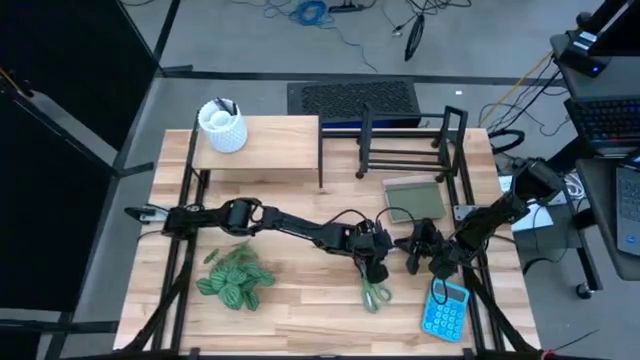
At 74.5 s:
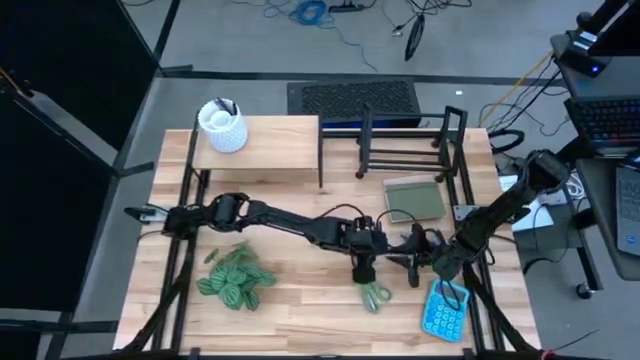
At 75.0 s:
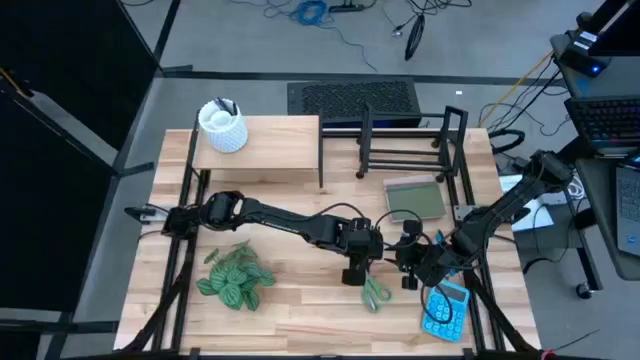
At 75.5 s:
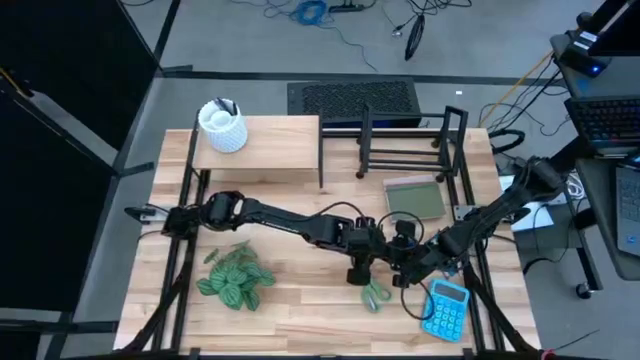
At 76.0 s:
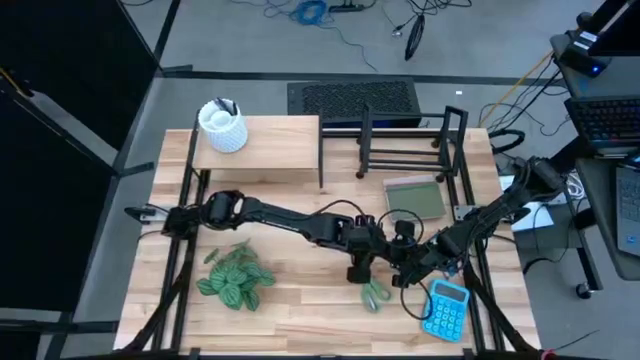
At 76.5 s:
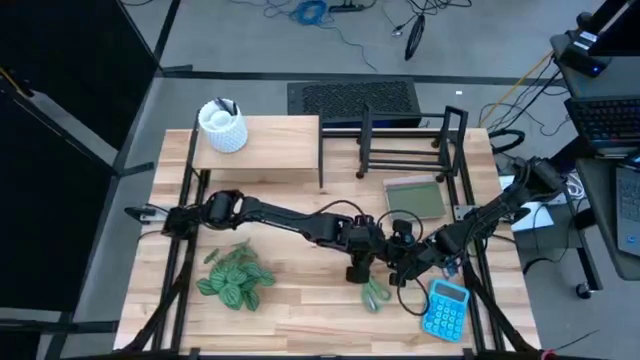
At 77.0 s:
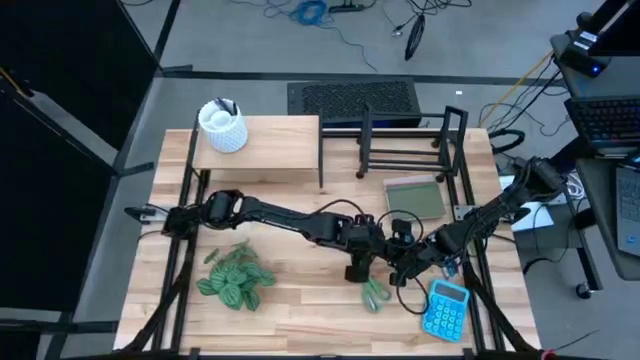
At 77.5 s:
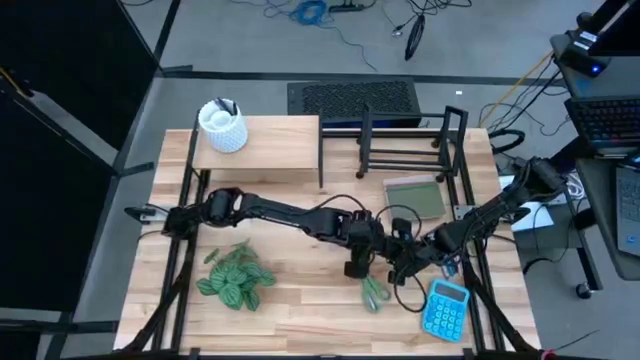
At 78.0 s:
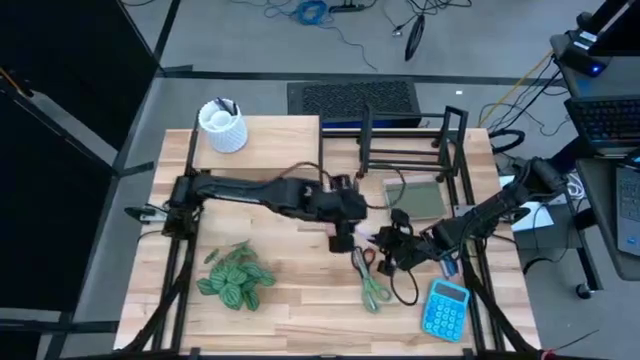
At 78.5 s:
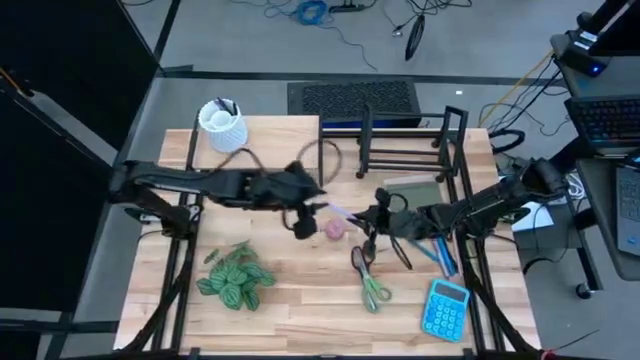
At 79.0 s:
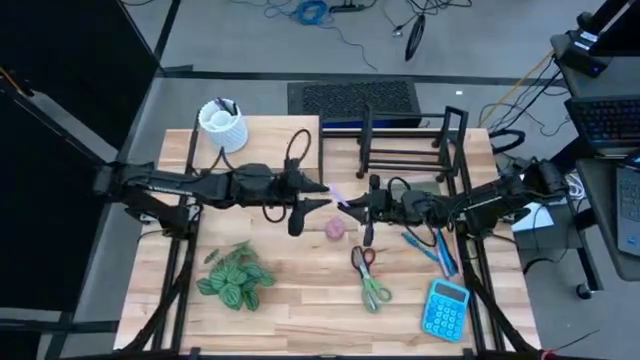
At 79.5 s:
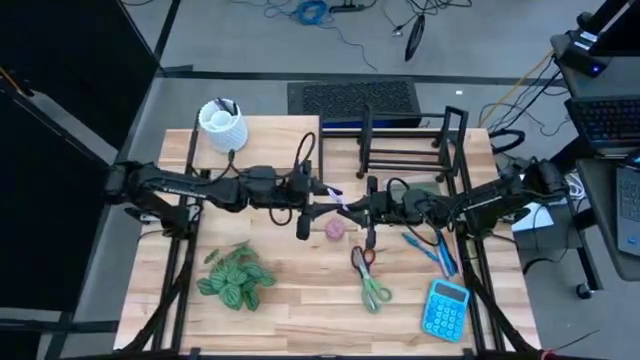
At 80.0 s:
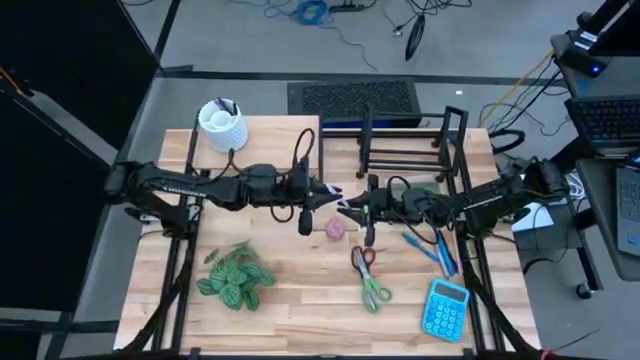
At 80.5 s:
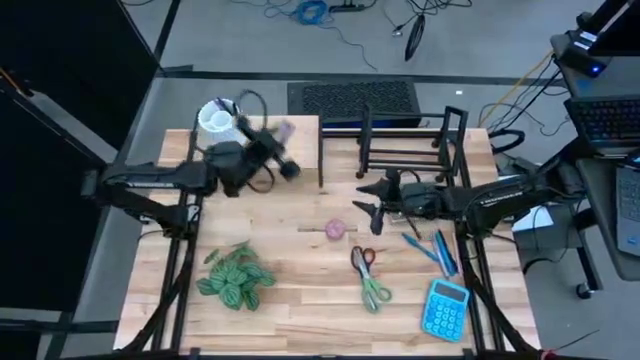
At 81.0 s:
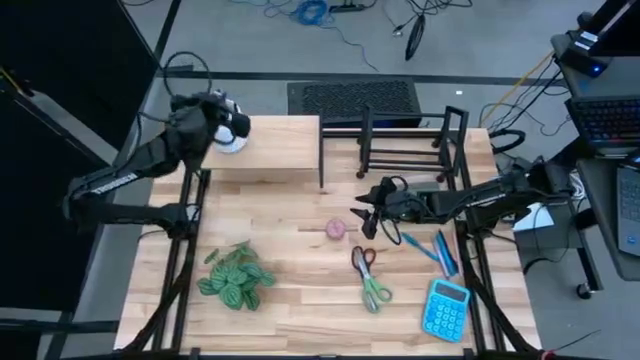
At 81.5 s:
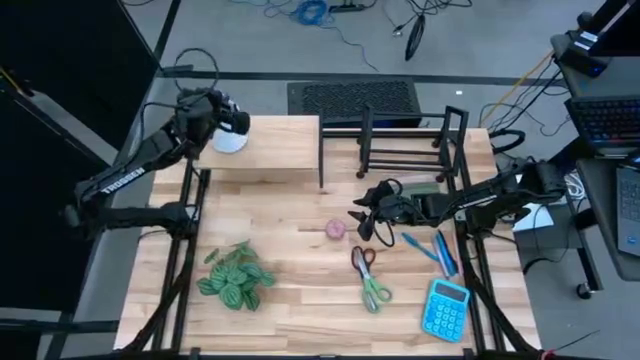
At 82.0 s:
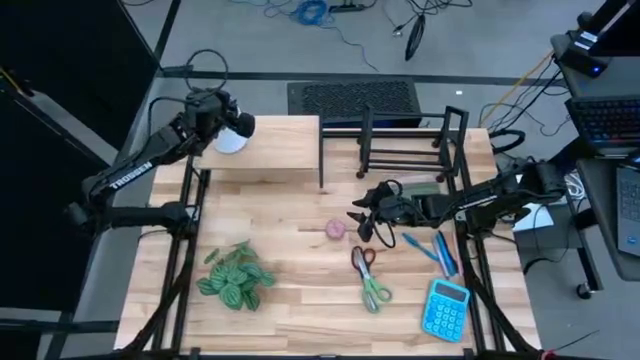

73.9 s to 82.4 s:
Task: Stock shelves
Put the purple pen into the white pen holder

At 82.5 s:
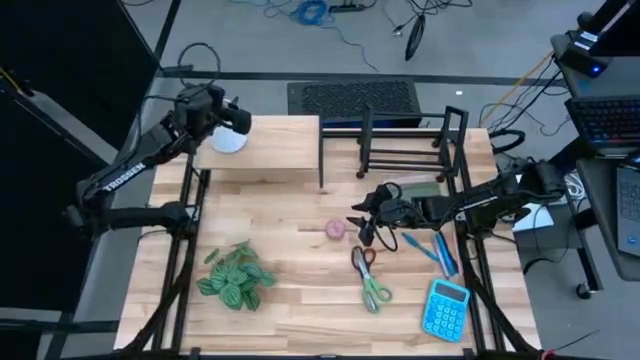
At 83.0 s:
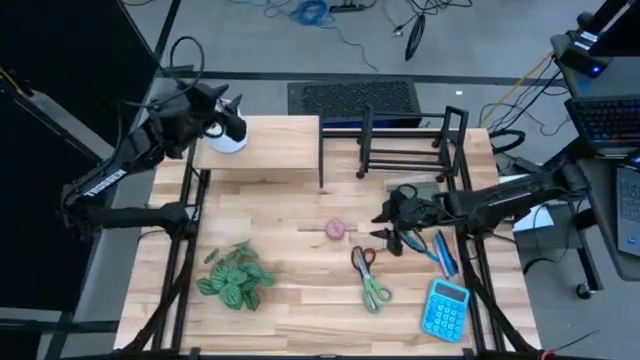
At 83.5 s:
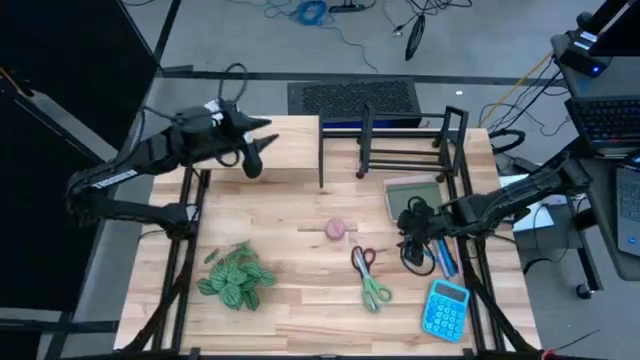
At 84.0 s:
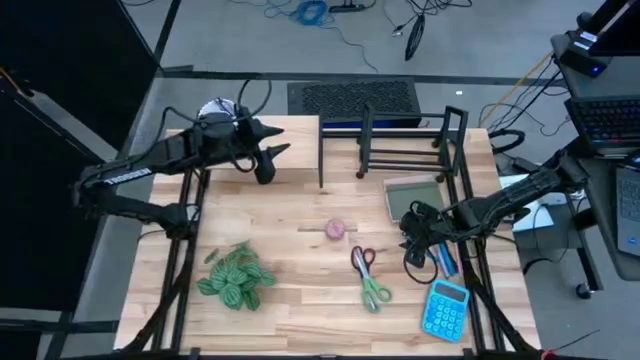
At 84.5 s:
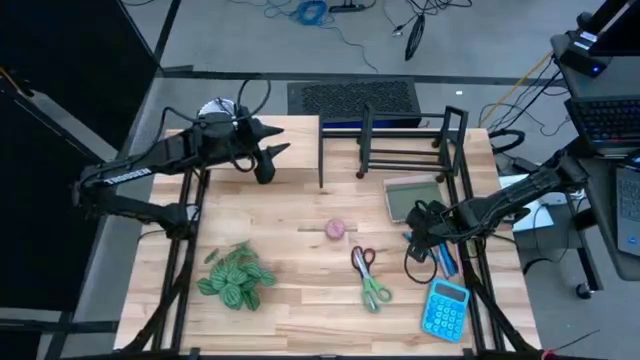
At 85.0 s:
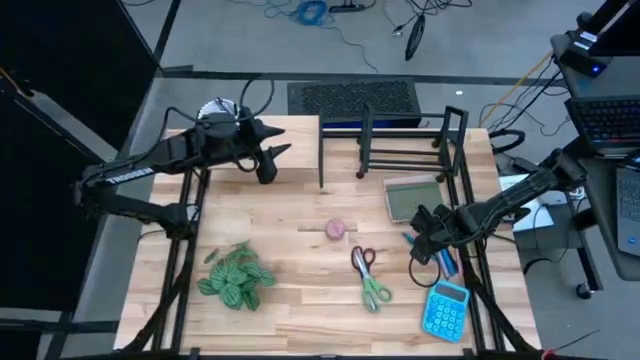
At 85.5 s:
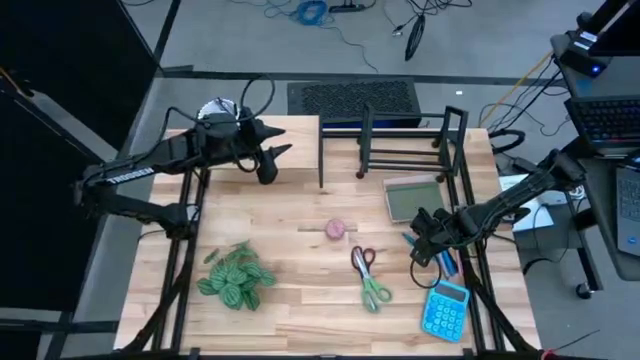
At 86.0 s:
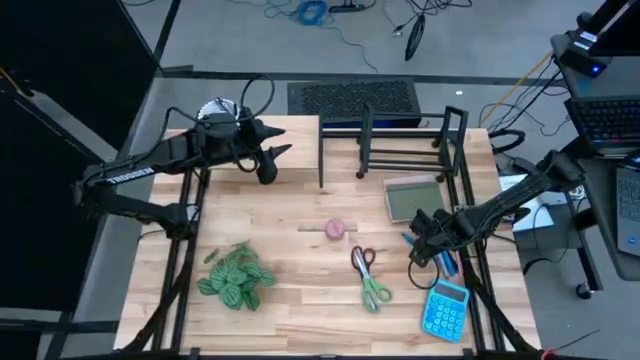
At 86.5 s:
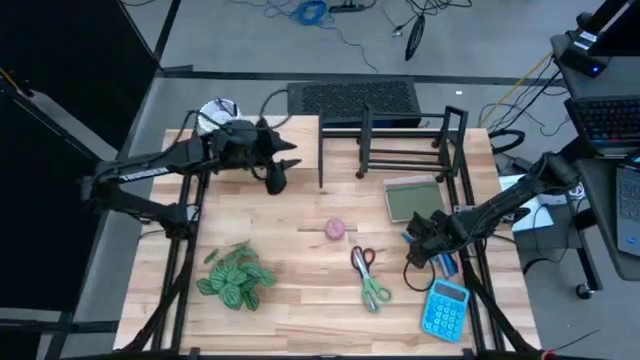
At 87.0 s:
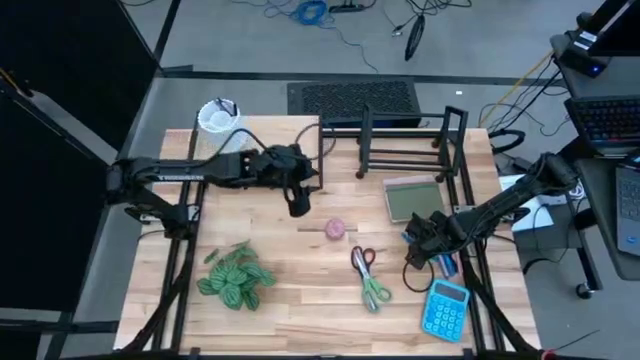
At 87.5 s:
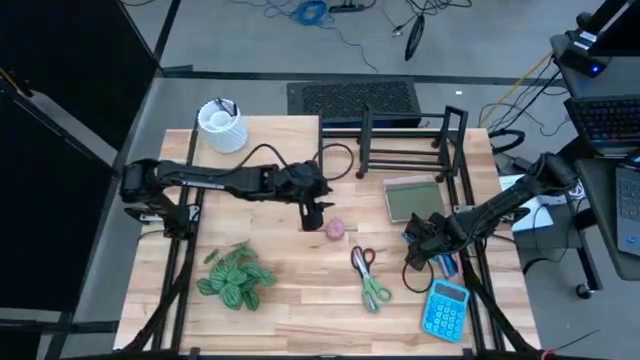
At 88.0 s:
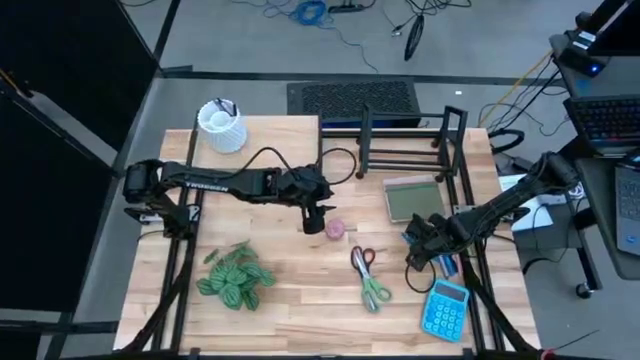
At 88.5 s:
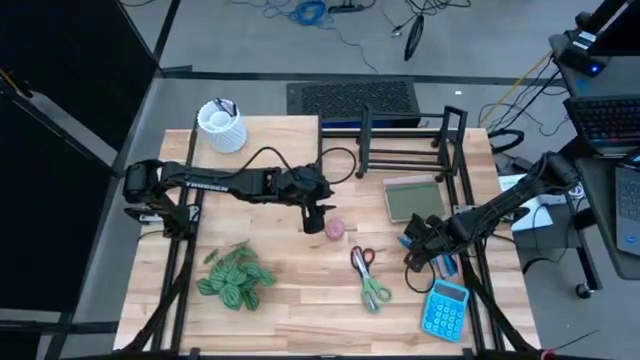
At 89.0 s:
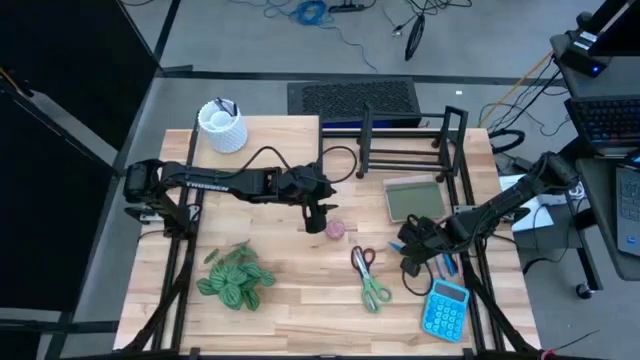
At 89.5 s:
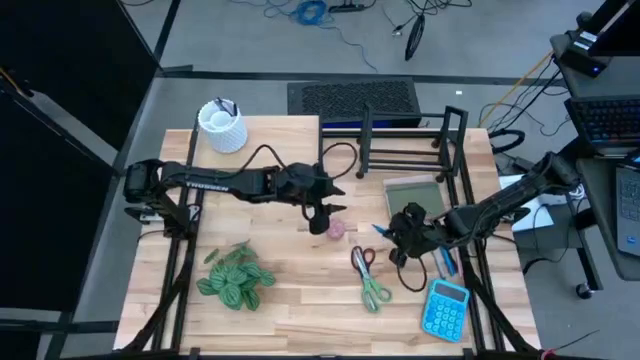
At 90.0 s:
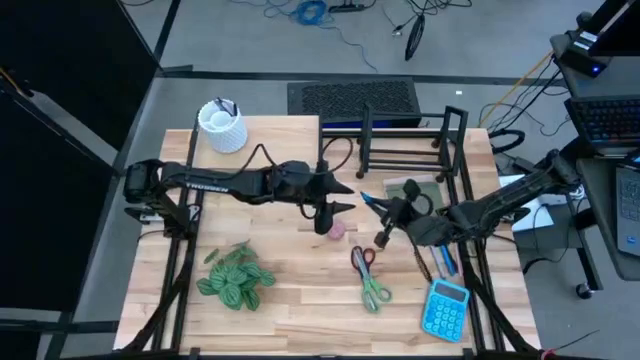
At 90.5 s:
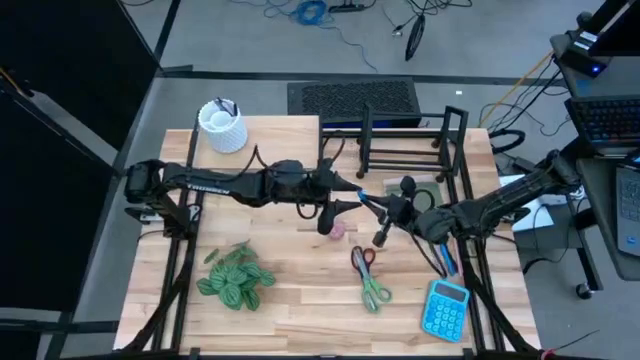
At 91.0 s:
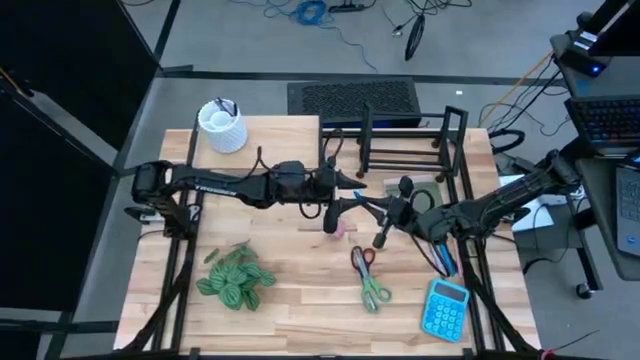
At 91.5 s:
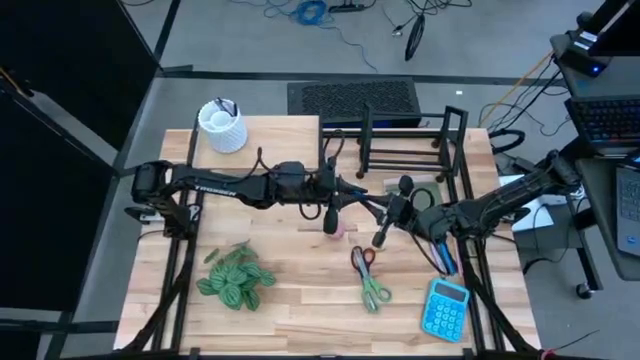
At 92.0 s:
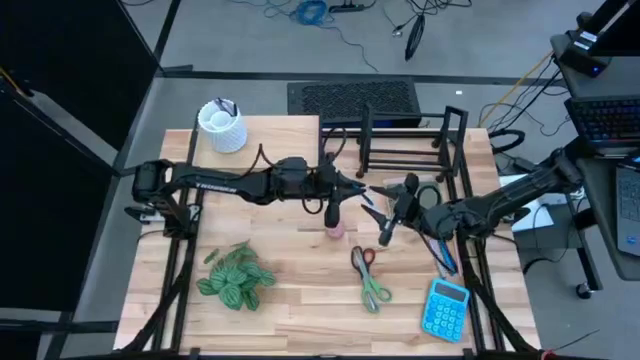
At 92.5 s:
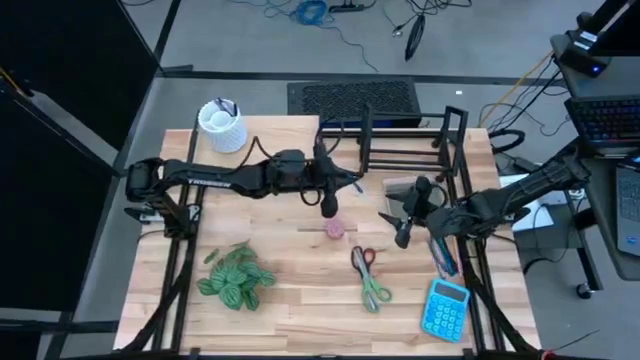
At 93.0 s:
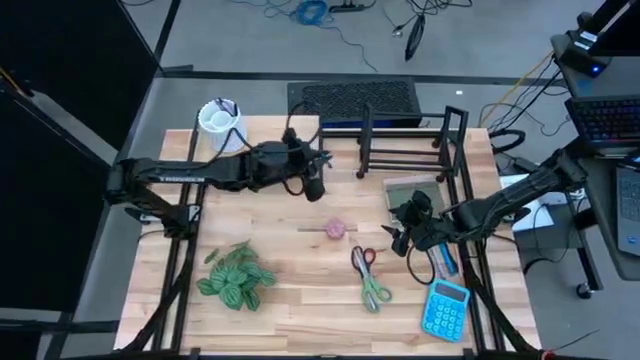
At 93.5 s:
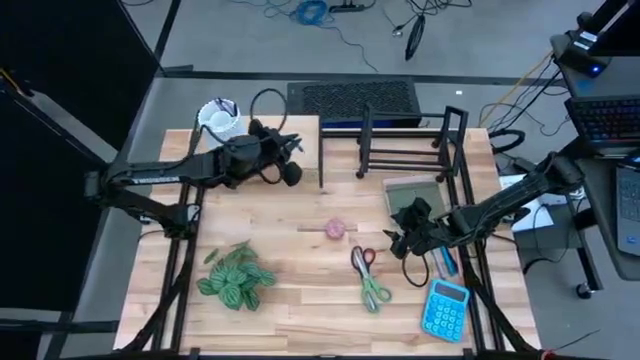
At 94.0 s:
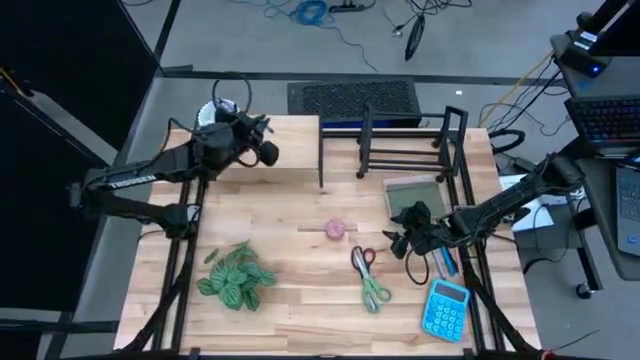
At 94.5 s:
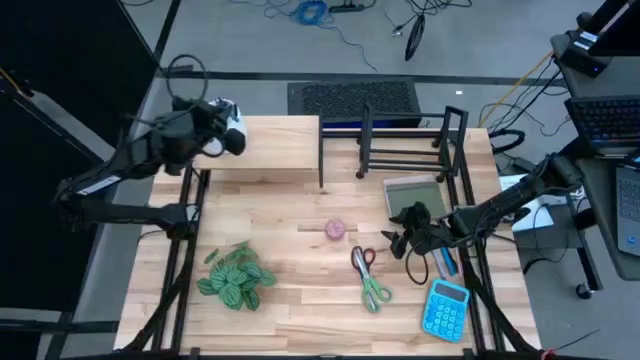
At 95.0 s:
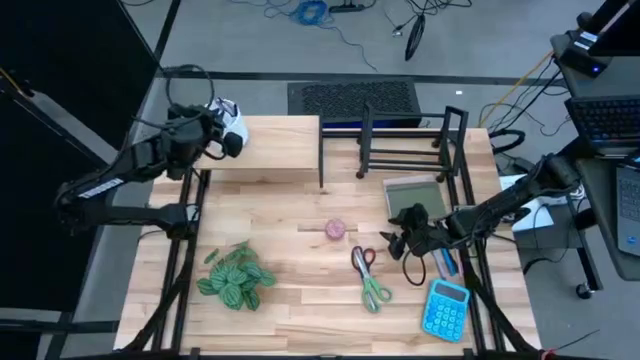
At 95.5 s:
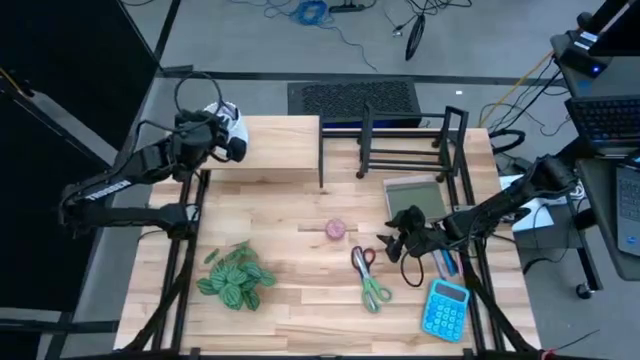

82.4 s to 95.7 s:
Put the blue pen into the white pen holder

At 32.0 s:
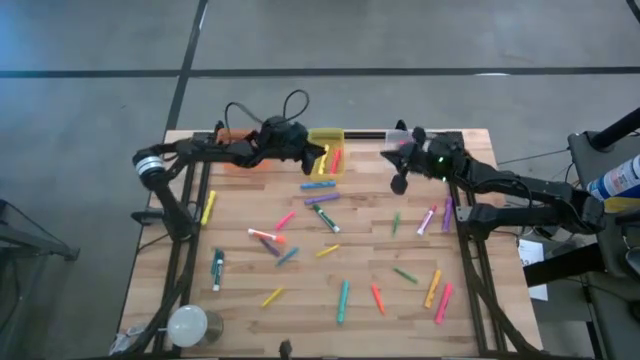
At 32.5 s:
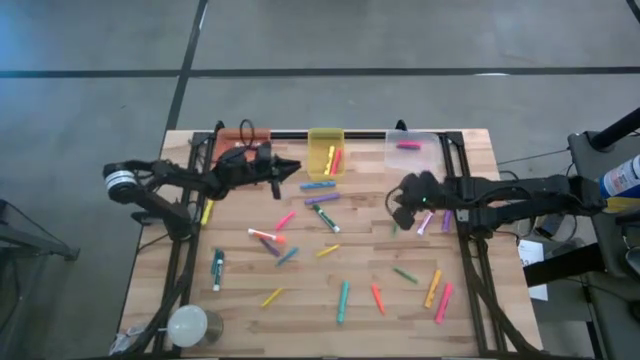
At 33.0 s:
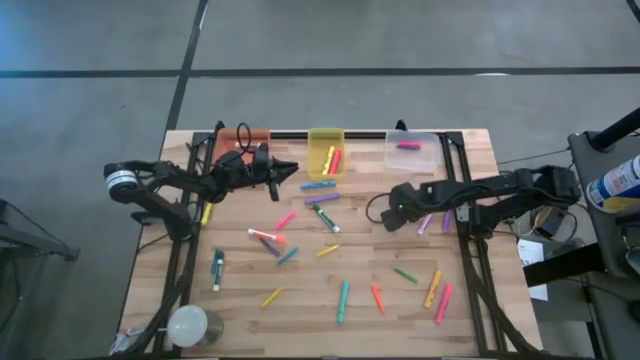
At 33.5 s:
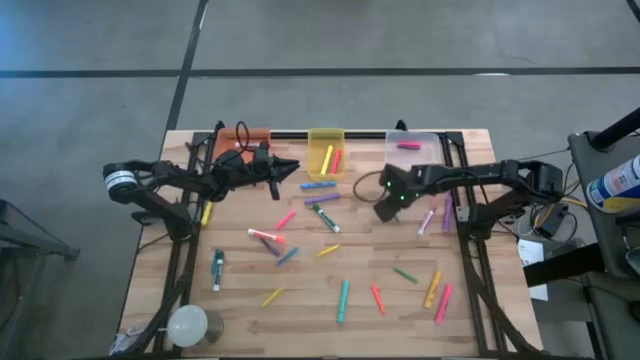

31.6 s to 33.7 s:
Task: Pick & Place Markers
Put the top green pen into the transparent bin
